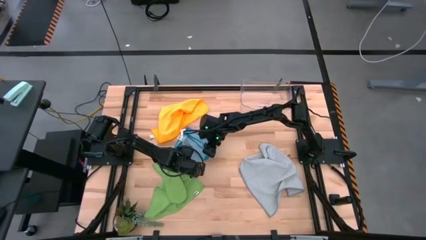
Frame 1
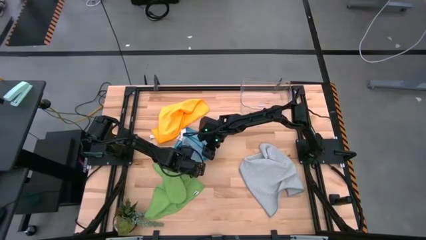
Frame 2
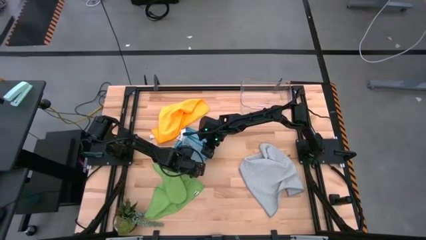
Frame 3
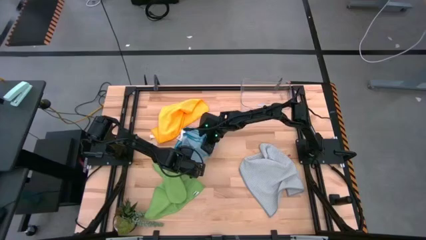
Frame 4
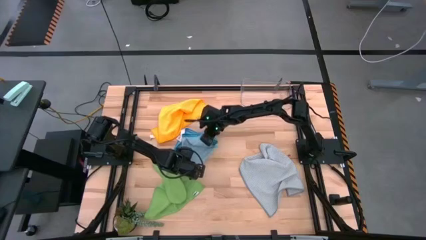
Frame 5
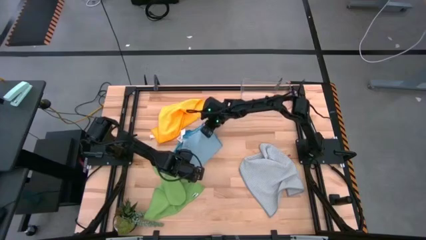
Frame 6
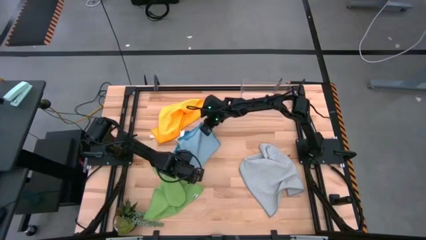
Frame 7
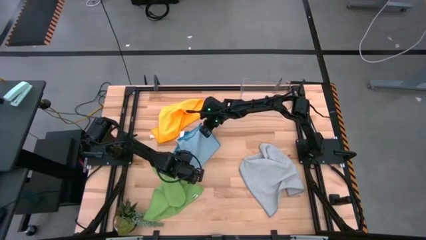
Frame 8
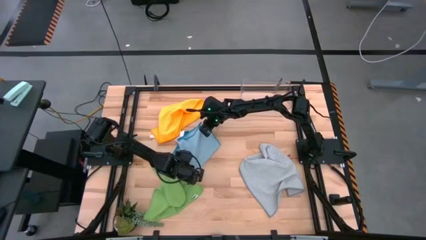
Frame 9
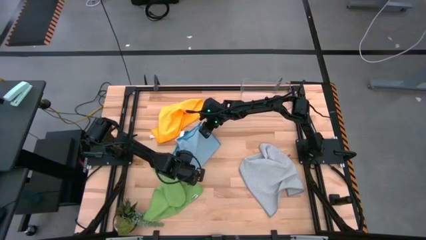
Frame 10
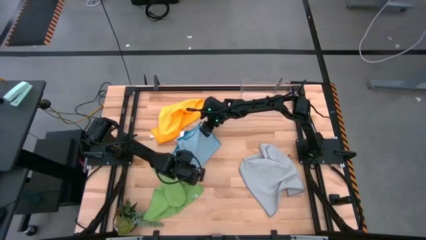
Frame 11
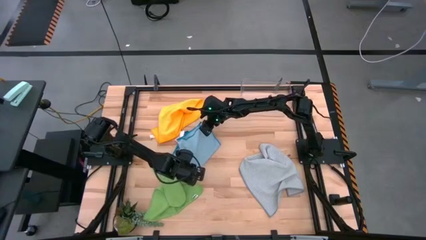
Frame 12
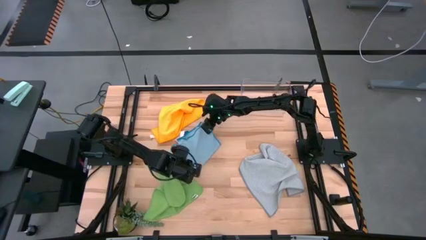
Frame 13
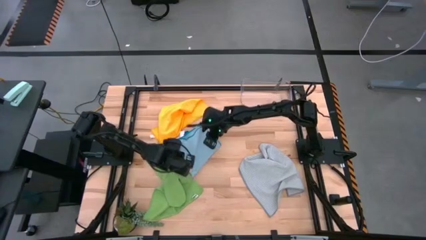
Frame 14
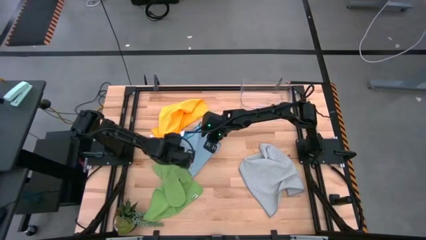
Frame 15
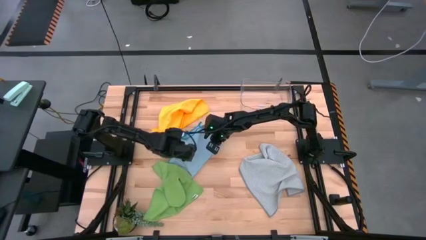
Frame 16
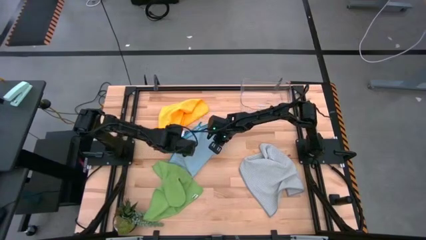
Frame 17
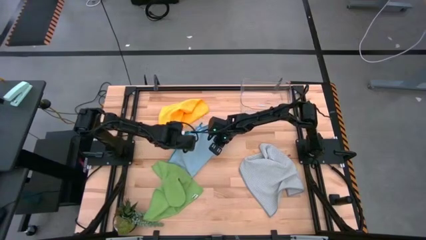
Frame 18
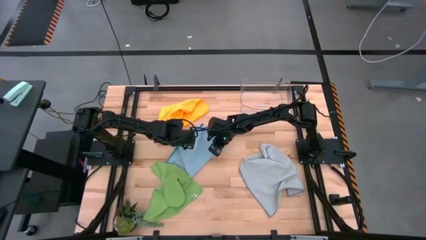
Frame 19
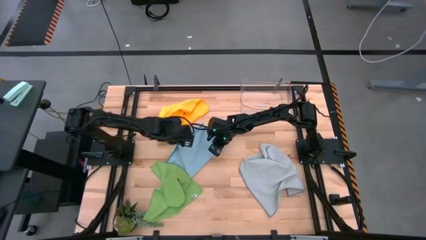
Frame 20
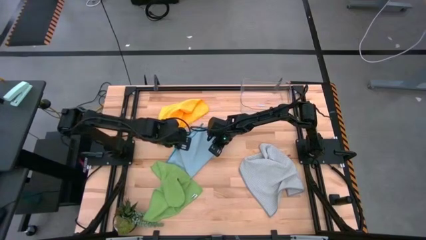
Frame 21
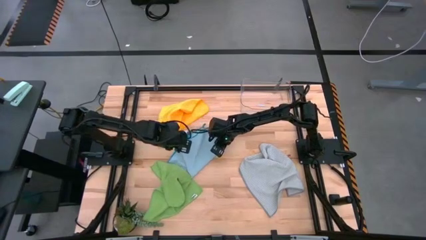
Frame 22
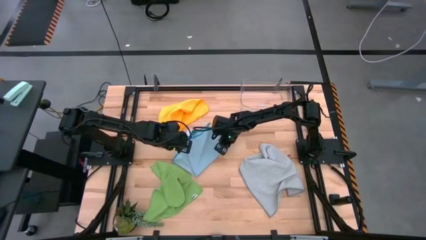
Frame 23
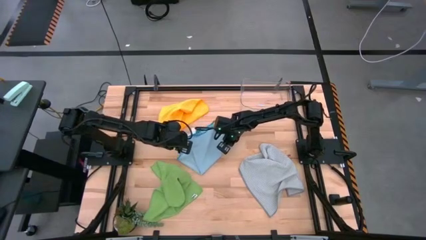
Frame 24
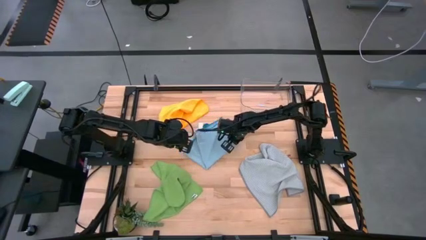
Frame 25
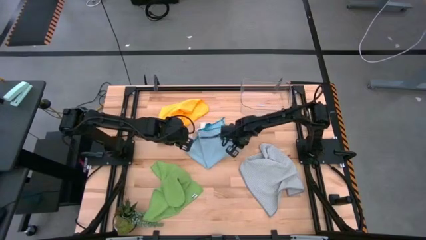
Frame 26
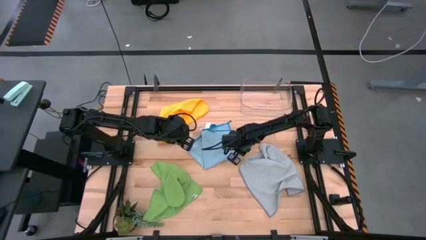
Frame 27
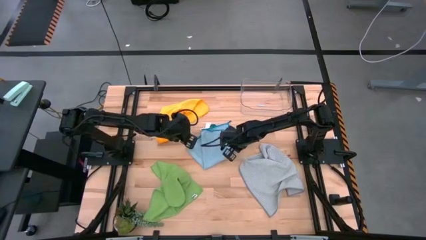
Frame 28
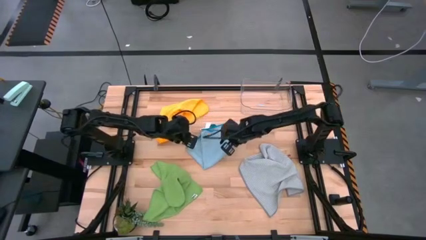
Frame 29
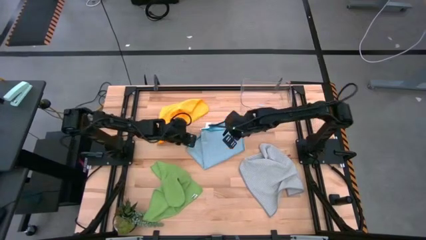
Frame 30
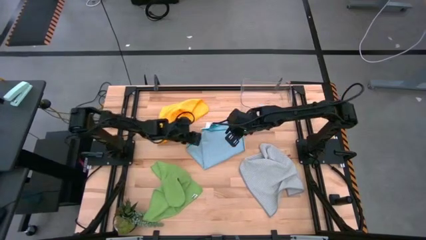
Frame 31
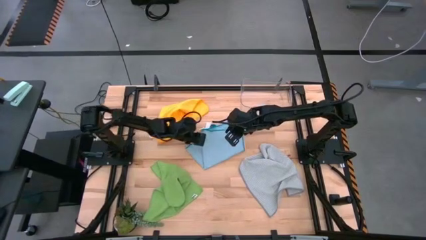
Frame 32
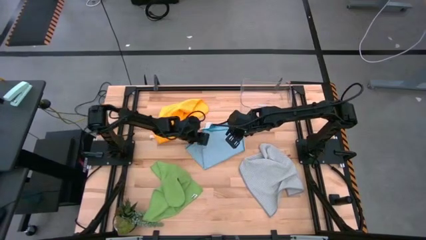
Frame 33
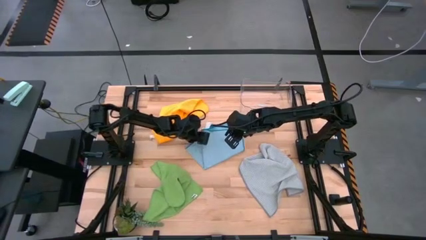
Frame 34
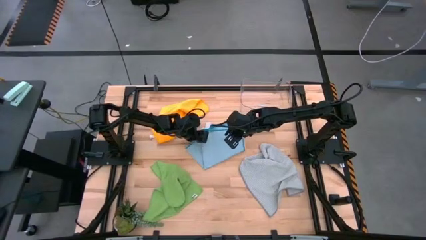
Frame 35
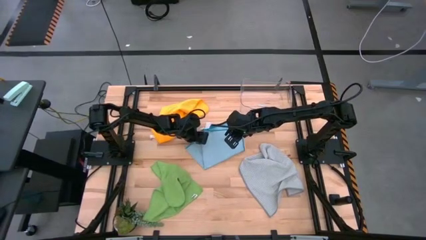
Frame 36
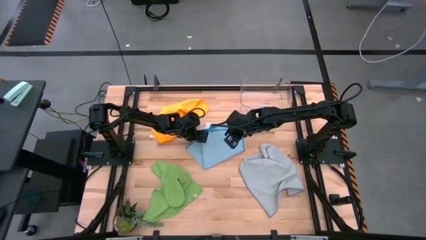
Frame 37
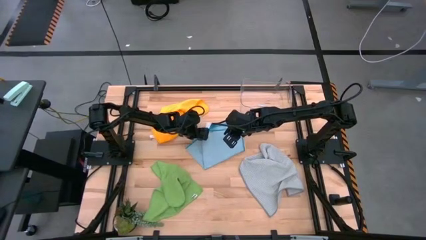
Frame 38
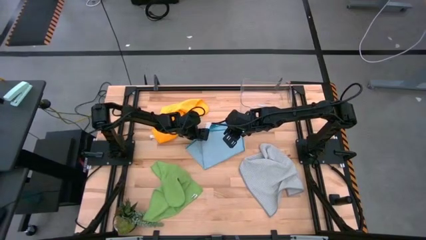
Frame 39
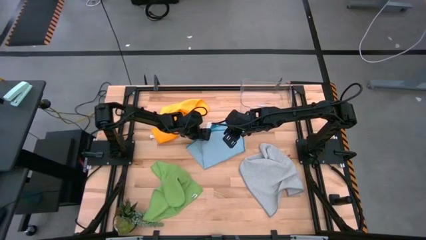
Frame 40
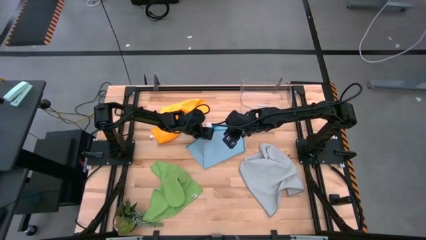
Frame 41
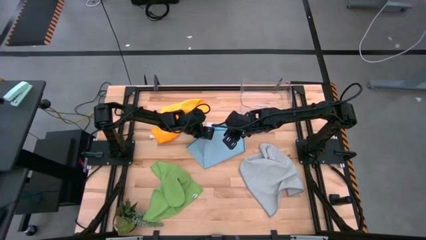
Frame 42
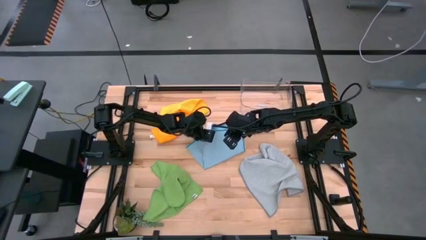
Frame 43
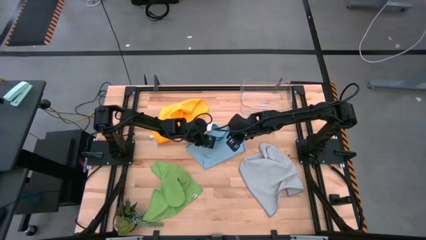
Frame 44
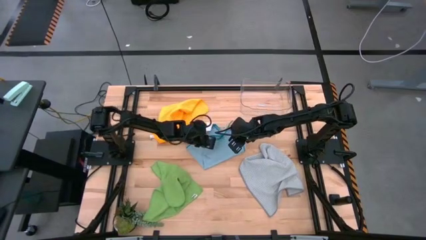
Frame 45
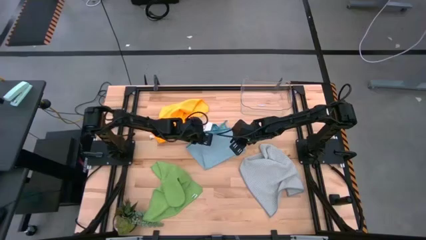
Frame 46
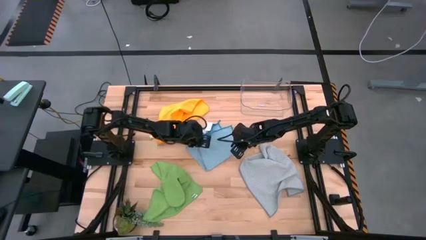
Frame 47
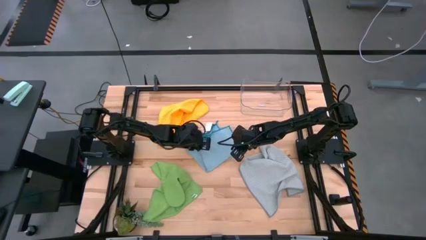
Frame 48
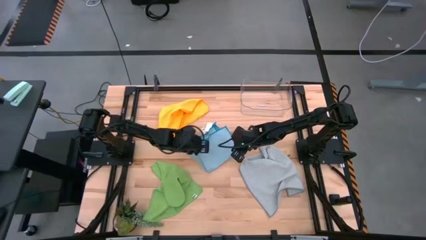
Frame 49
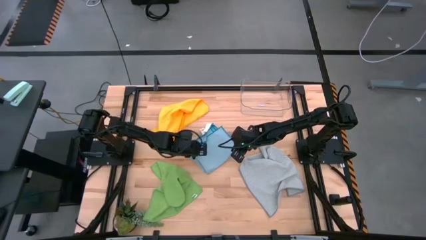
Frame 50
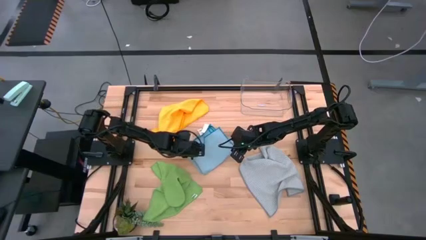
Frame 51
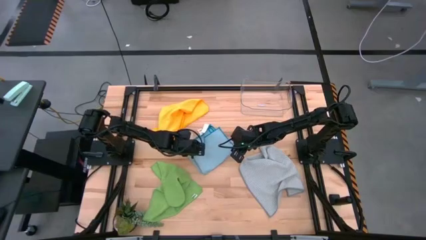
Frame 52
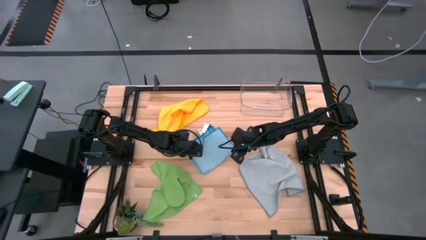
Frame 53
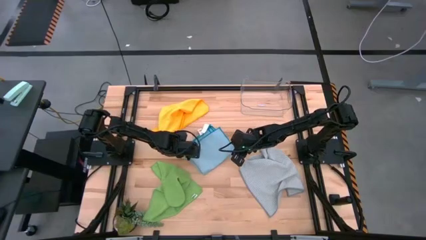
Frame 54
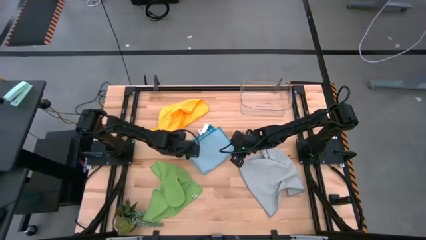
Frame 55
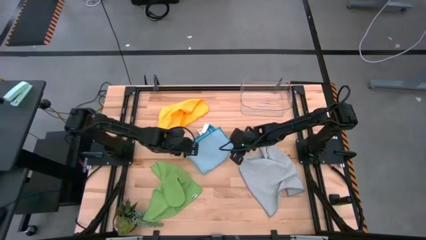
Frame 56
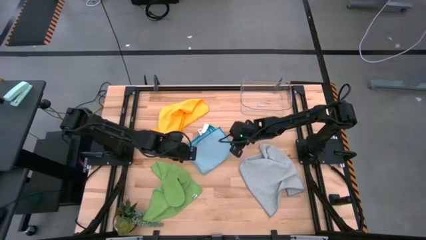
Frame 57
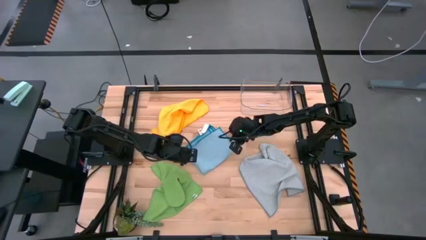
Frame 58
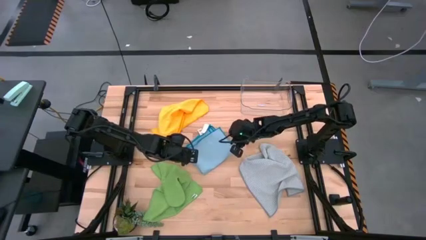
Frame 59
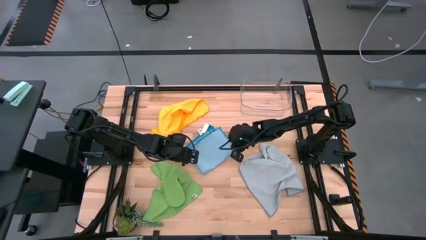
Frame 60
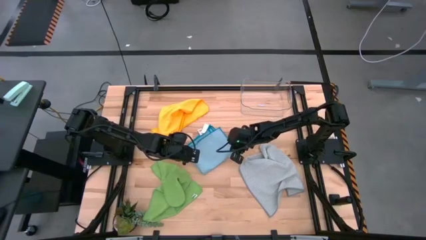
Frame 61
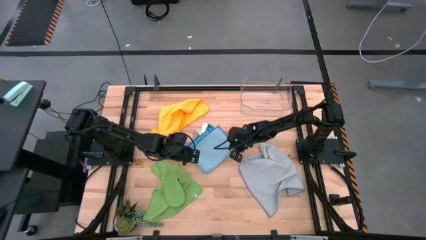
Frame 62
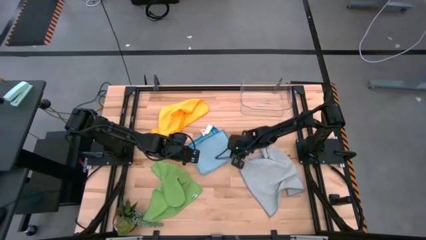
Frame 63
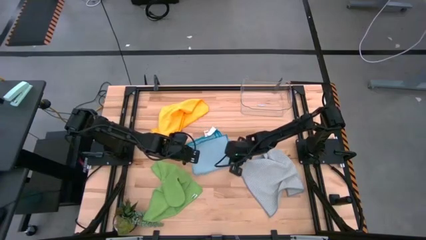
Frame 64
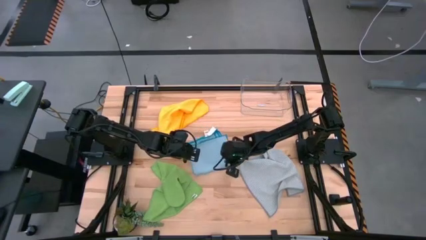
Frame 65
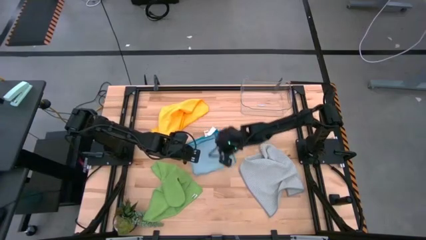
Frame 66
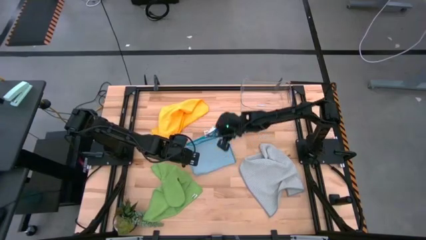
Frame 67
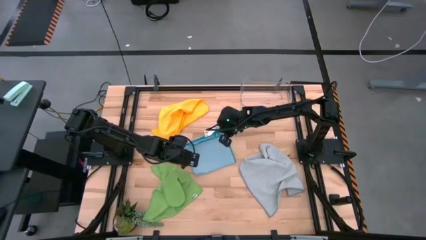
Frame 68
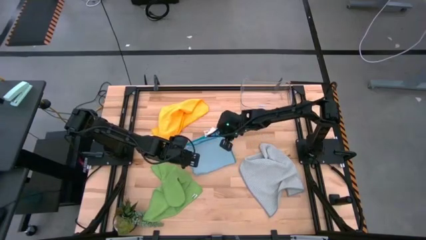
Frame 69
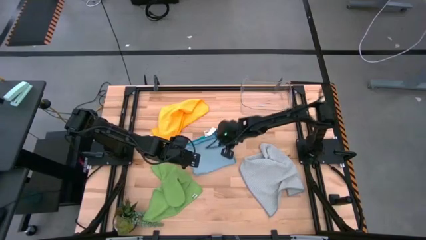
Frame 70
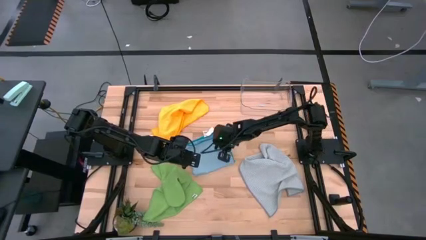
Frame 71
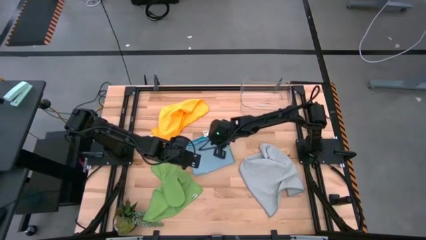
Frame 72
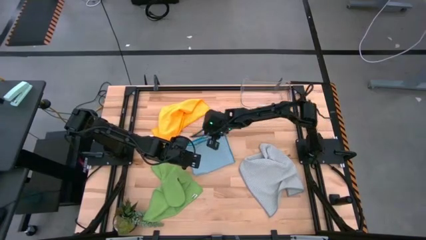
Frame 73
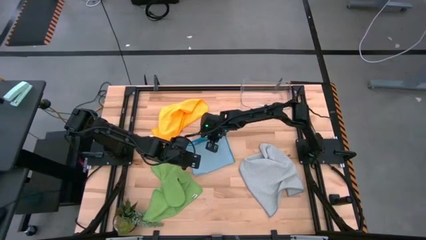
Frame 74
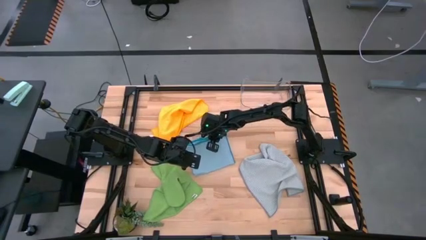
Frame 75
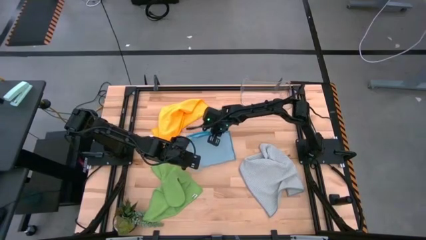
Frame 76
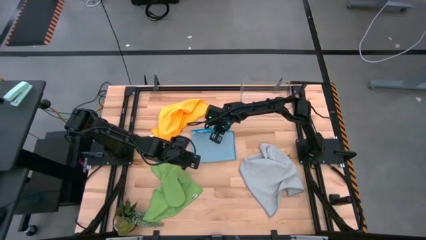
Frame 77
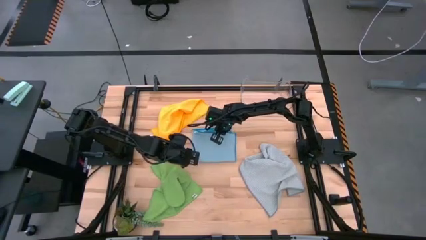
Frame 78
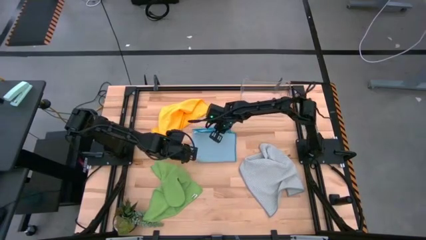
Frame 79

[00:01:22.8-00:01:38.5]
Task: Fold microfiber towels
Fold the blue microfiber cloth
